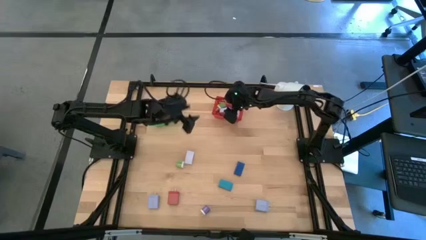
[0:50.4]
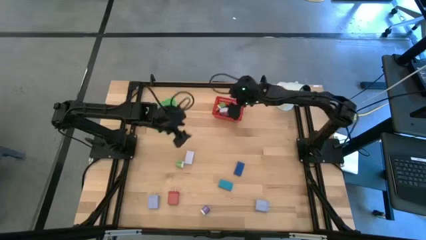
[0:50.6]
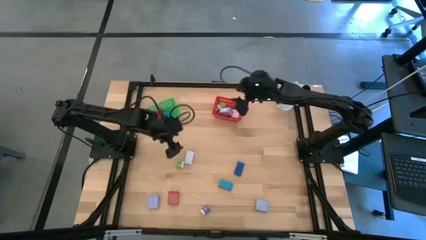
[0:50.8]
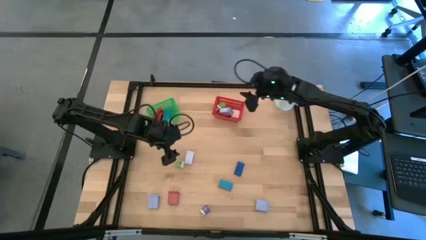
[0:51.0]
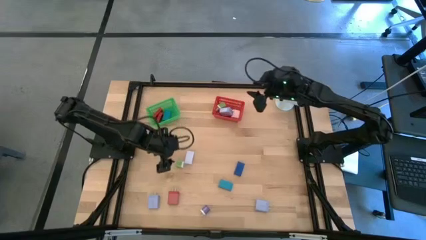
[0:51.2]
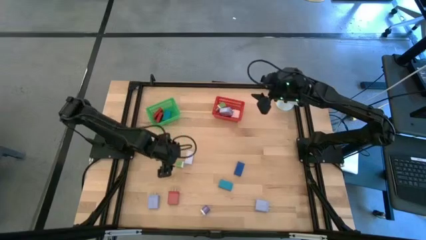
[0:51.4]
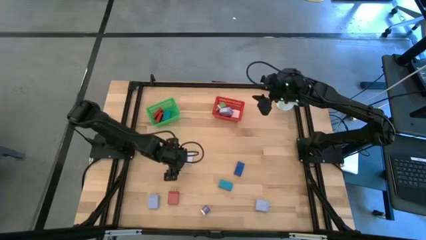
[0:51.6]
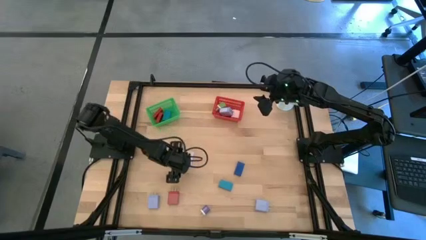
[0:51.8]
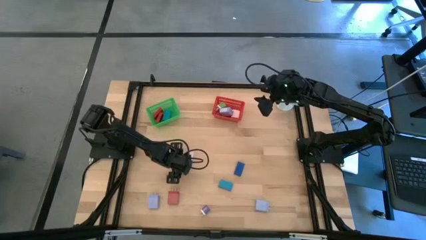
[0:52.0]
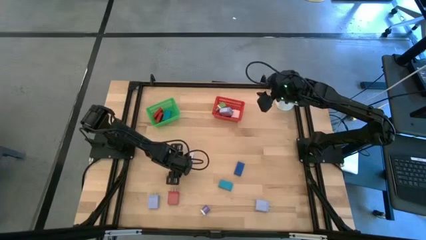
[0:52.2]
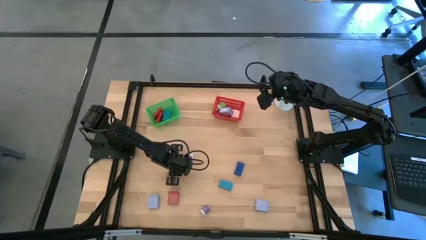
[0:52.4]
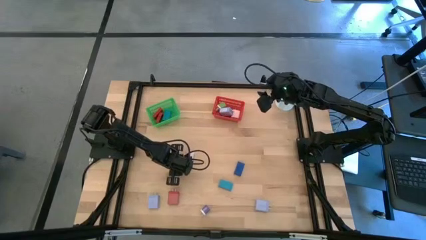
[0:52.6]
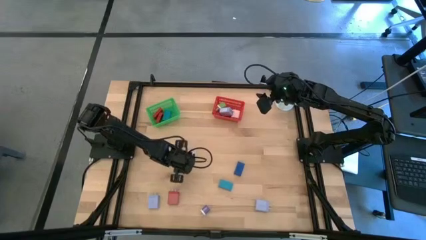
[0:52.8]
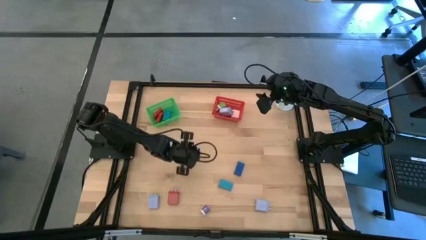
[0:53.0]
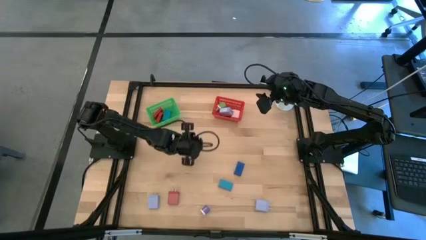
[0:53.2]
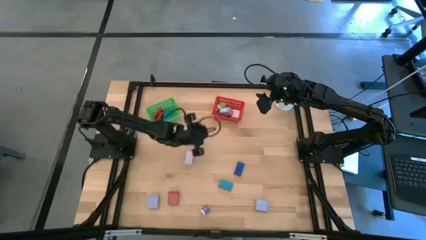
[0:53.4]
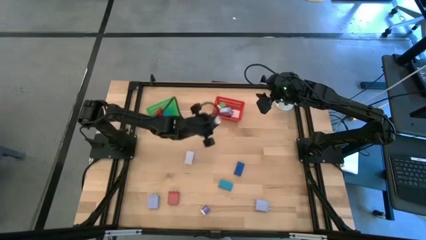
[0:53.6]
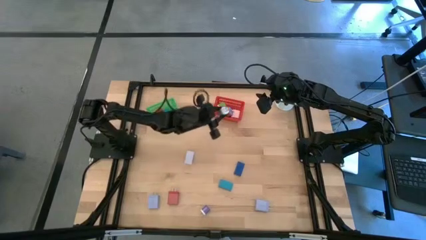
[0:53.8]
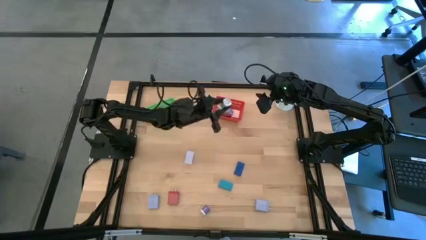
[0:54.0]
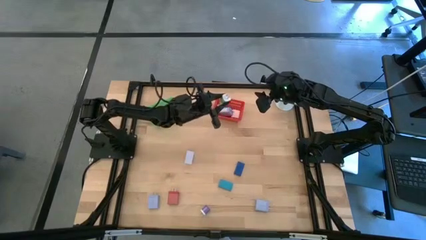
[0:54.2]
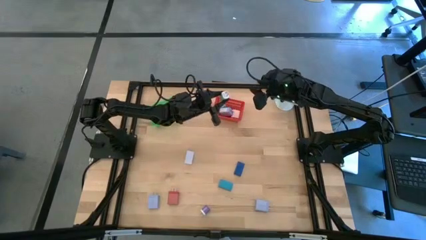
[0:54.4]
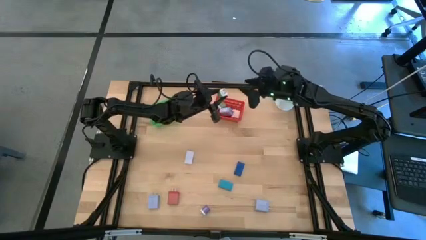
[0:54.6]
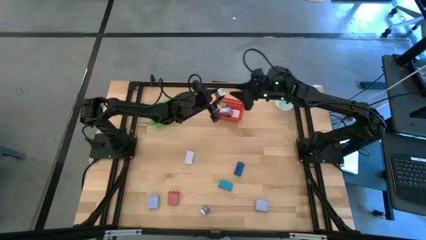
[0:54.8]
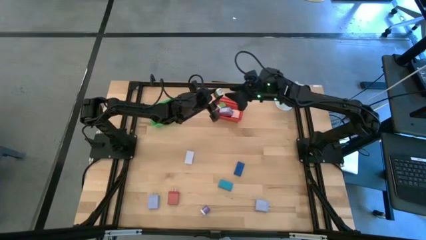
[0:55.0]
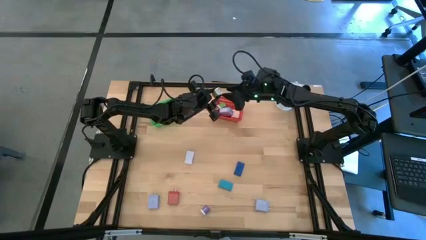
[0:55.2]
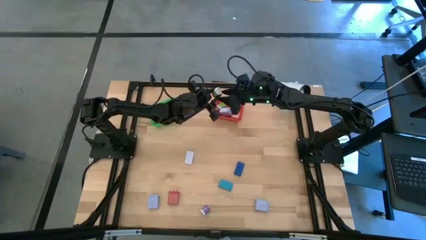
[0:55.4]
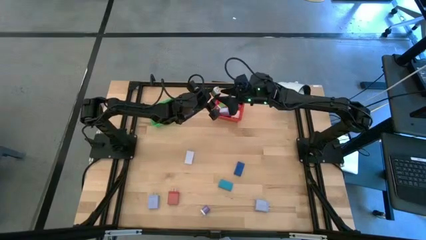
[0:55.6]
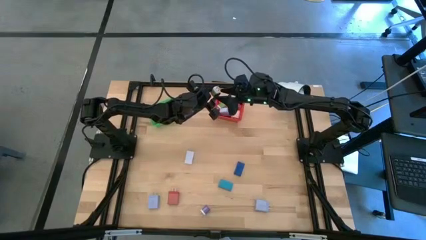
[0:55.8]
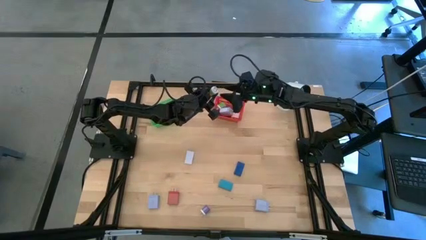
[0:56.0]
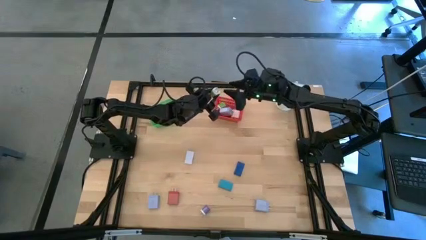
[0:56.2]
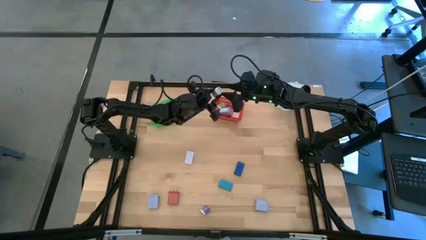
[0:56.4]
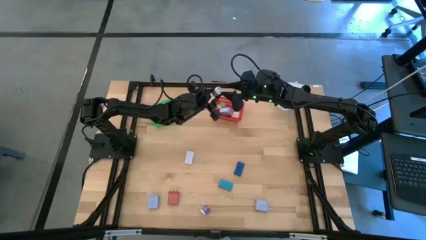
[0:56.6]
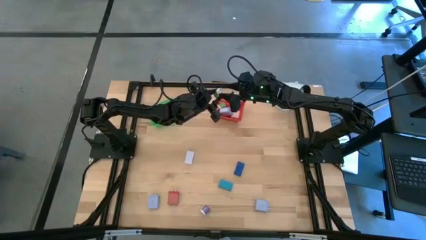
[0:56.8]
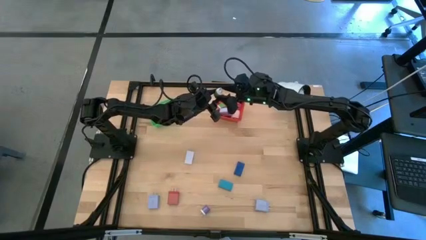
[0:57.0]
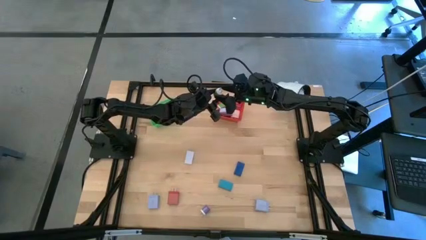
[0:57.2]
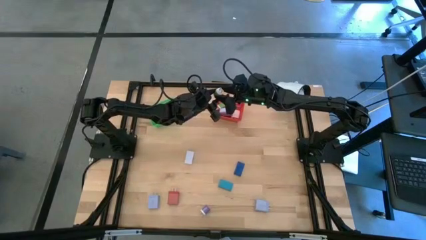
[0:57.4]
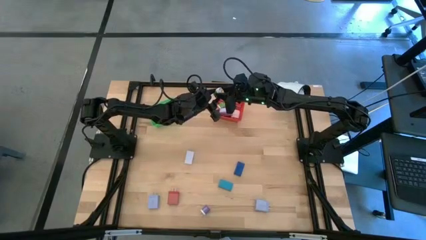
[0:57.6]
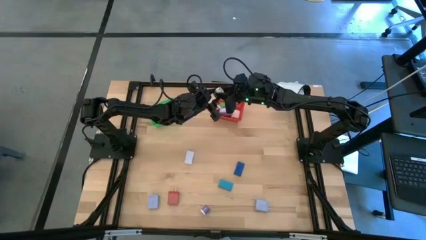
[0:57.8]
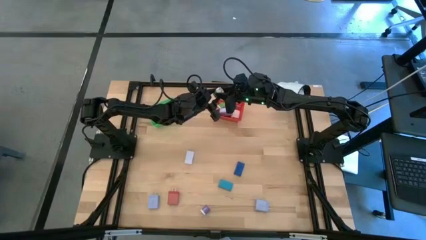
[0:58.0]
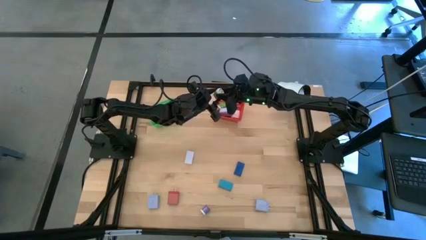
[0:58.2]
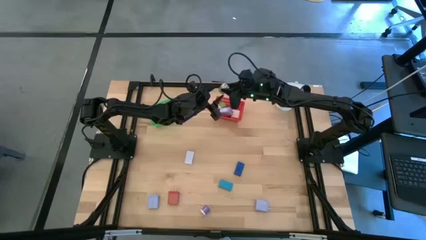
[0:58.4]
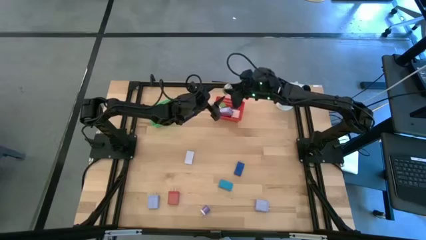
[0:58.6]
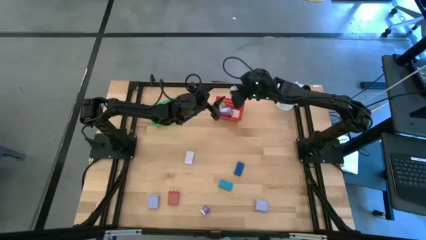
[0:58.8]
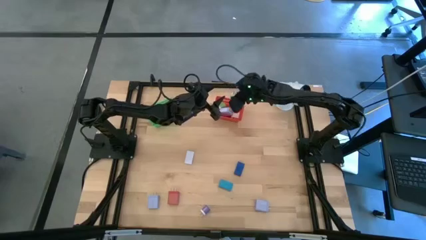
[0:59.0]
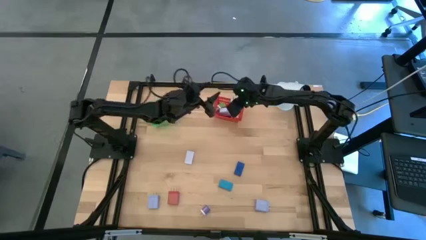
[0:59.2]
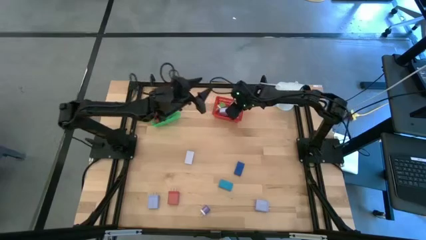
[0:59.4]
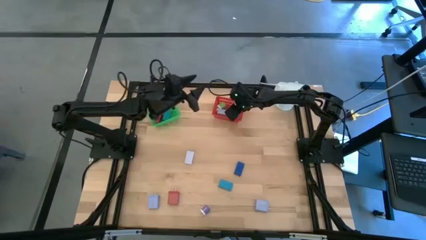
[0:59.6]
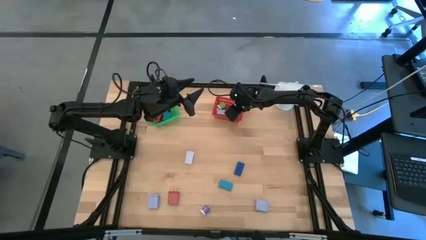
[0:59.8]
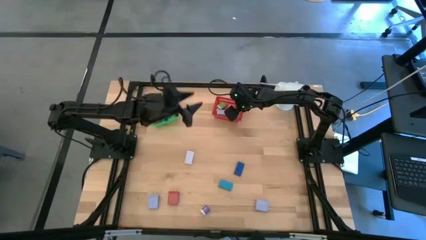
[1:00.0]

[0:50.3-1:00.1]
Task: Pick & Place Office items
Put the green charger adapter into the red bin

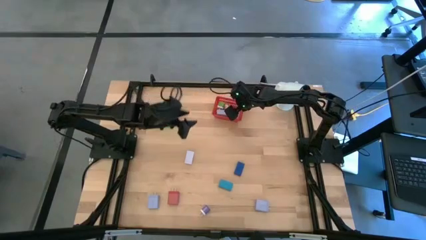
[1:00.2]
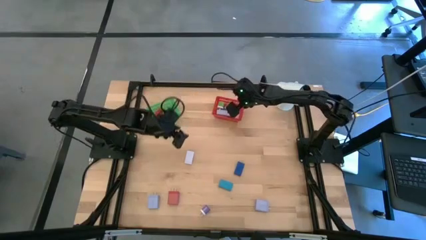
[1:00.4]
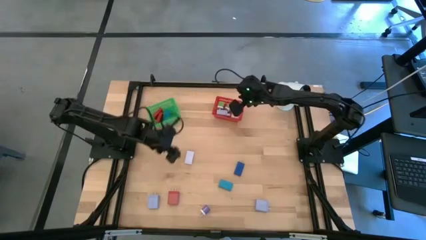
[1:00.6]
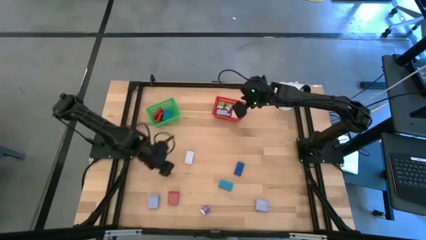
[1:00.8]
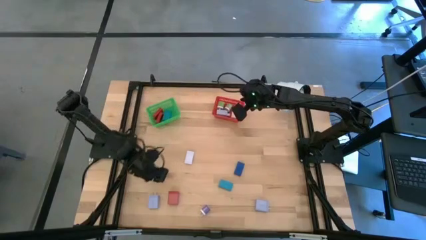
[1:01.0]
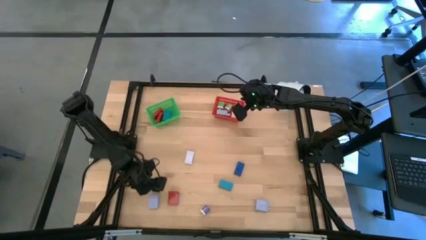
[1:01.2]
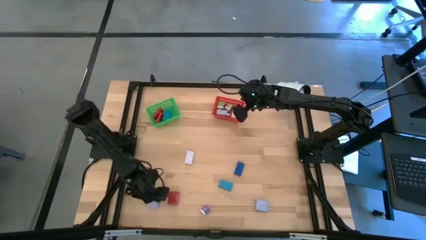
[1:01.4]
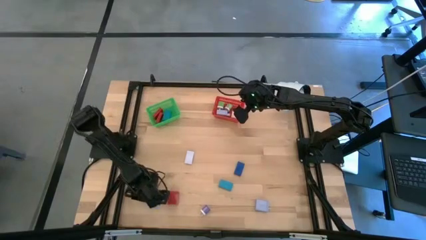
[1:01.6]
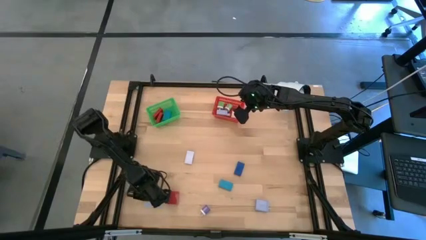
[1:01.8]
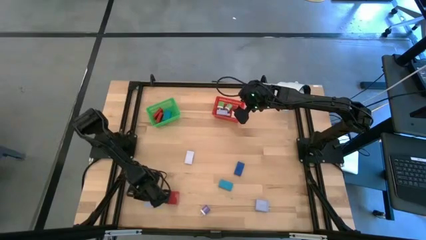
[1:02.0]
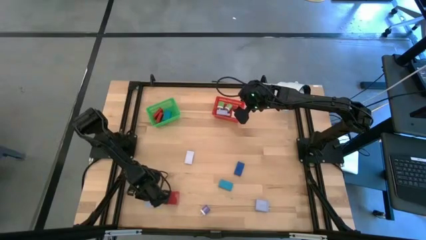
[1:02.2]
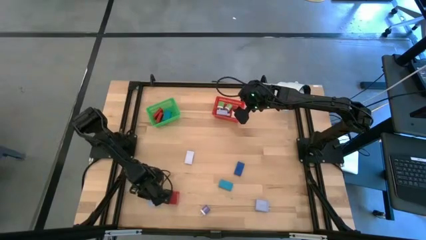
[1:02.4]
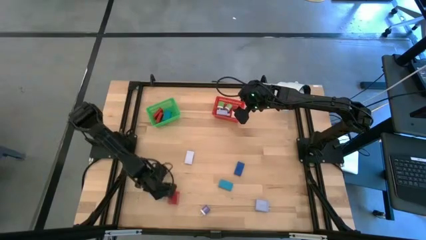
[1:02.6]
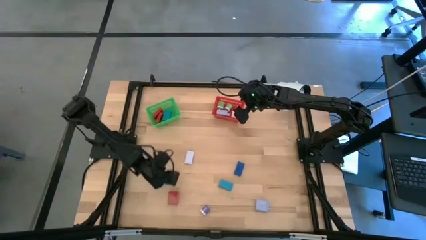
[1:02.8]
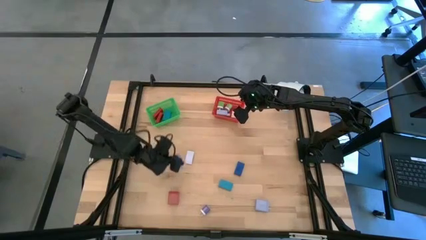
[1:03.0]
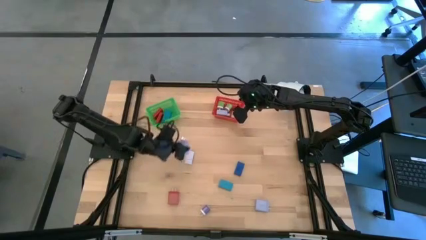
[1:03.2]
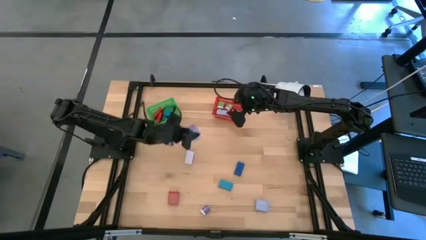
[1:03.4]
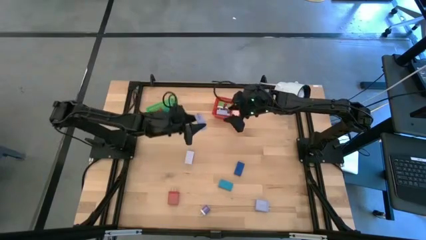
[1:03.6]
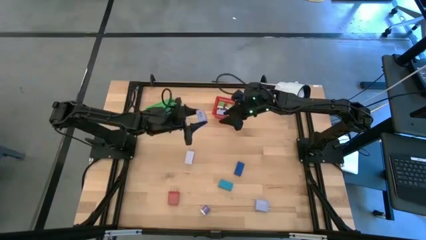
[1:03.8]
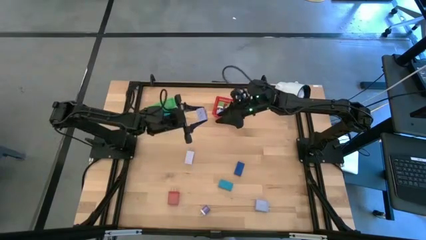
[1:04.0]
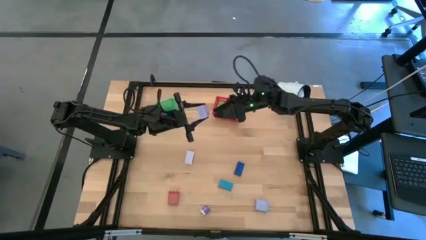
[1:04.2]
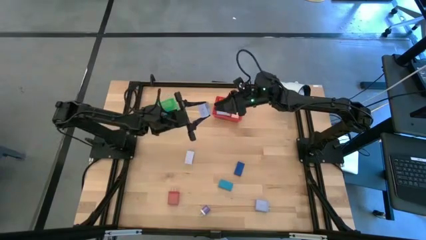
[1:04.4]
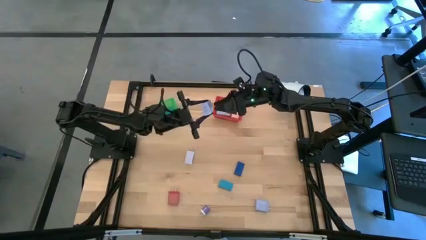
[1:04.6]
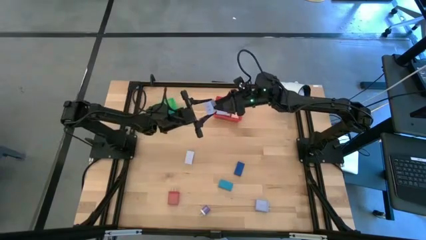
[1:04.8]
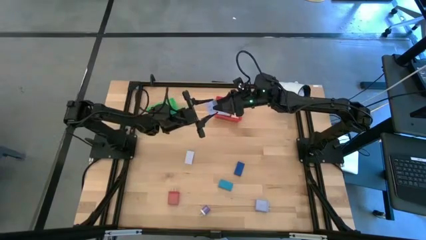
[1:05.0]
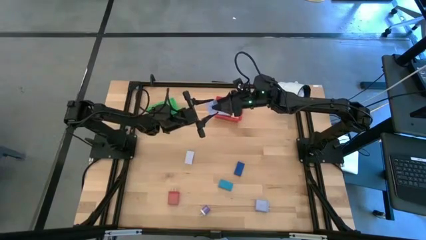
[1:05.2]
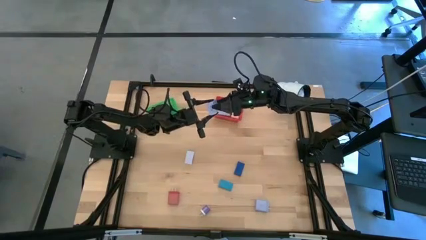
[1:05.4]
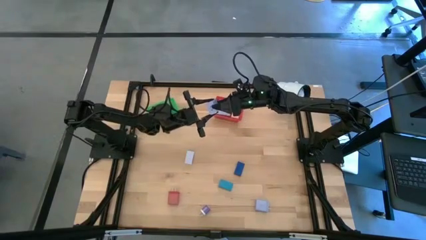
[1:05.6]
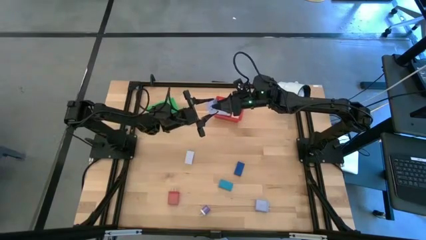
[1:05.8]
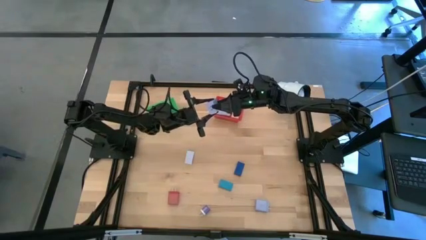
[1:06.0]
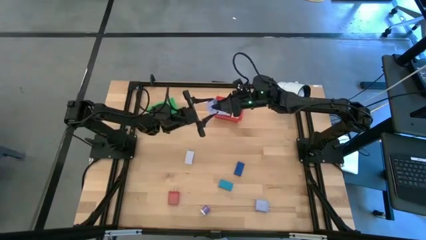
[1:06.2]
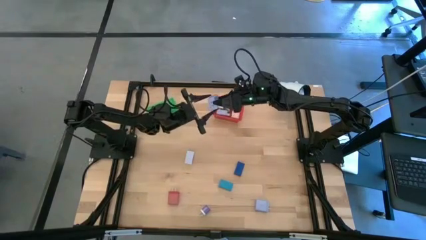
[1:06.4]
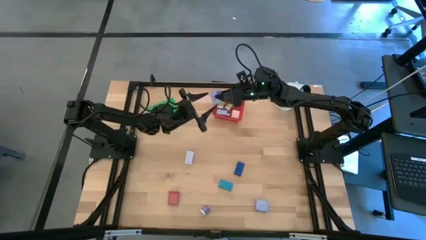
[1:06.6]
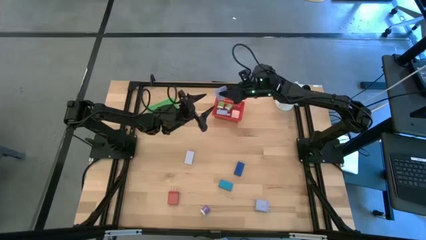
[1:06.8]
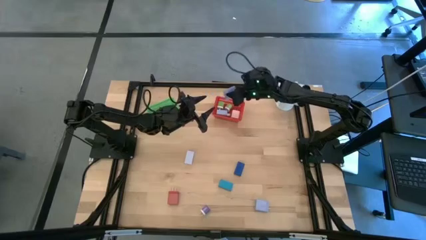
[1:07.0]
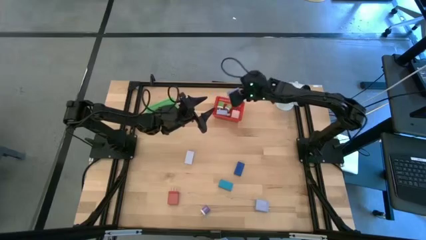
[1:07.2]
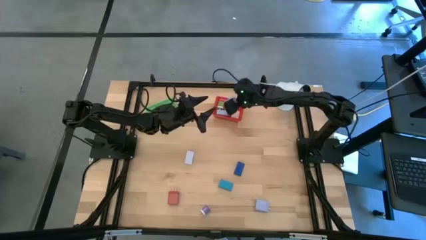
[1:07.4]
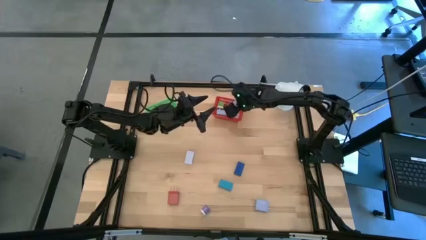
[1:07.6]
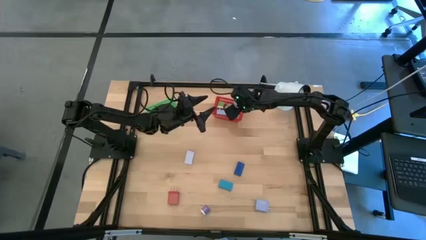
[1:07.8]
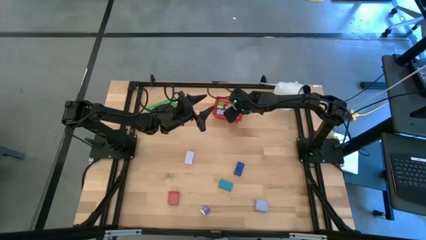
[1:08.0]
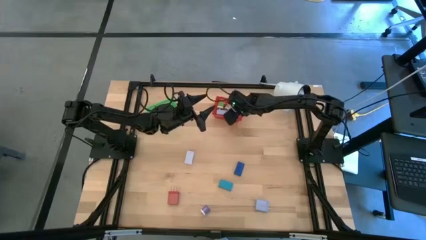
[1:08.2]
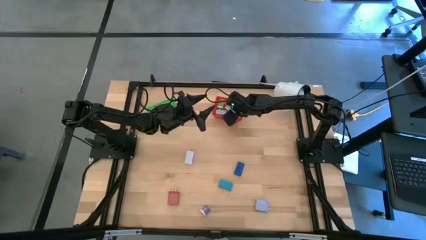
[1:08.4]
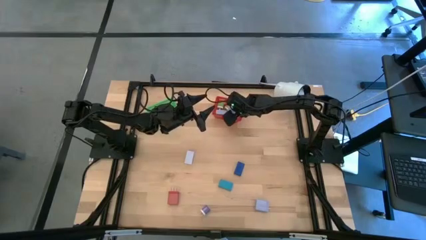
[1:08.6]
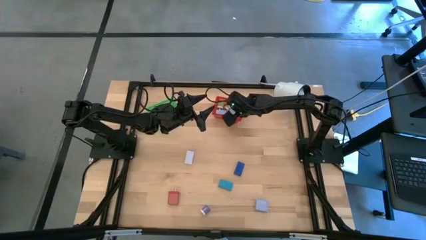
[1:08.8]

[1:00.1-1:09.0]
Put the left purple charger adapter into the red bin
